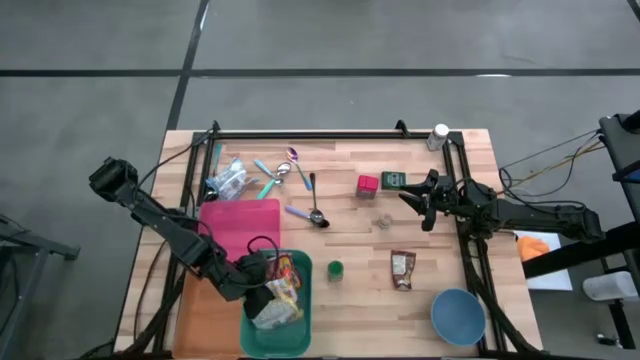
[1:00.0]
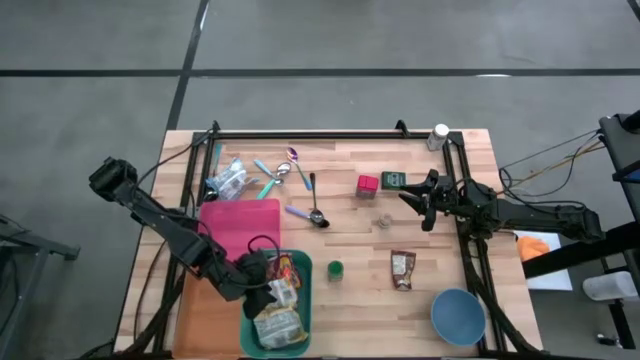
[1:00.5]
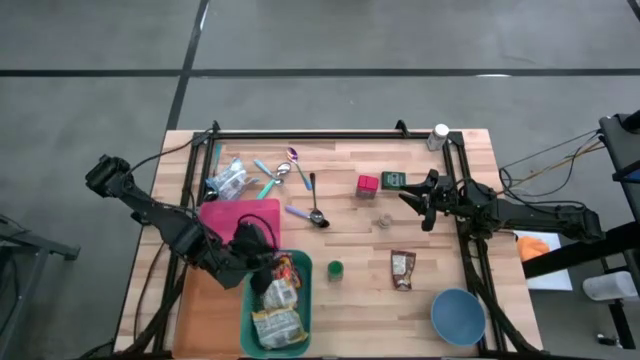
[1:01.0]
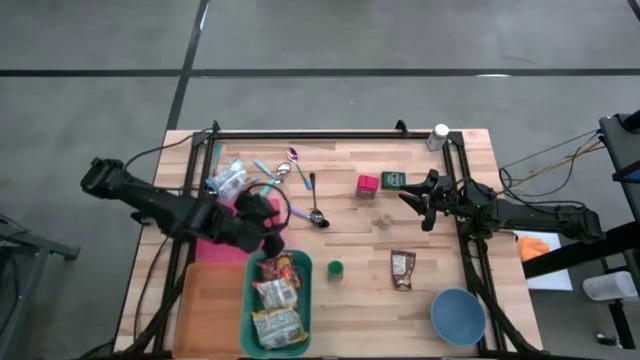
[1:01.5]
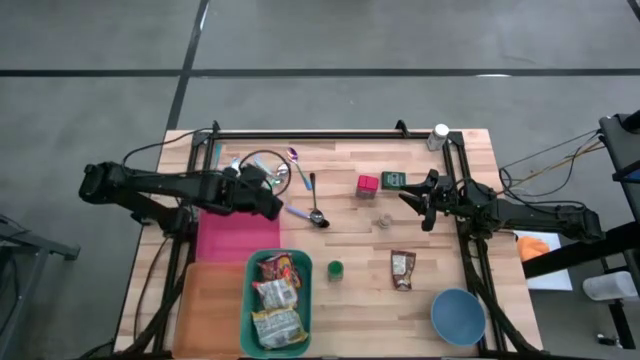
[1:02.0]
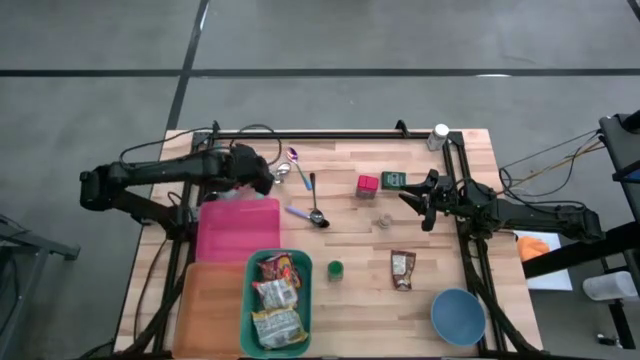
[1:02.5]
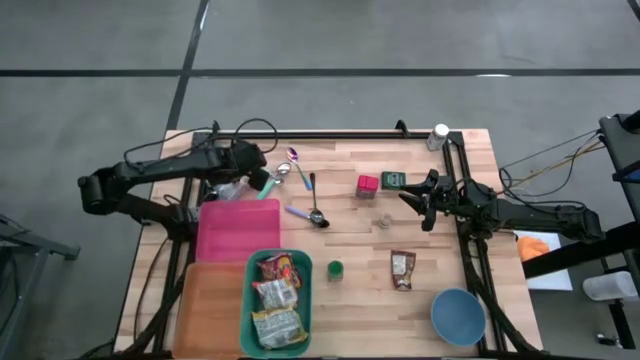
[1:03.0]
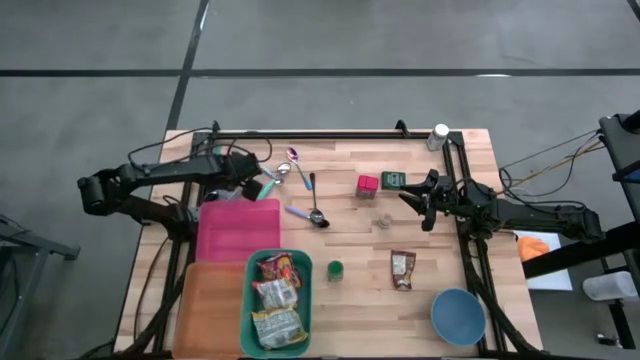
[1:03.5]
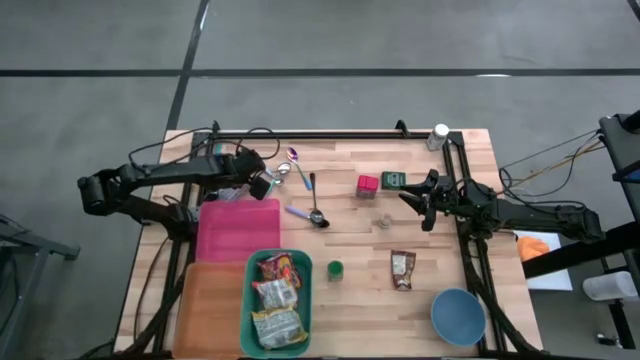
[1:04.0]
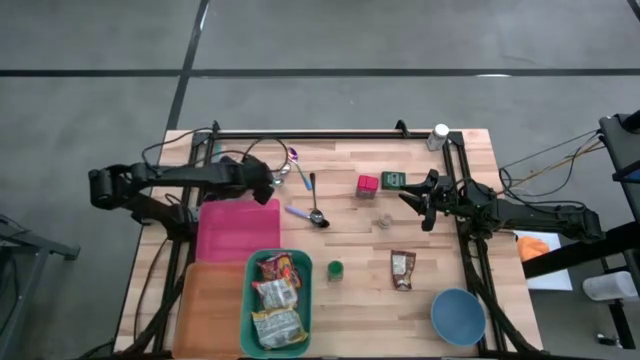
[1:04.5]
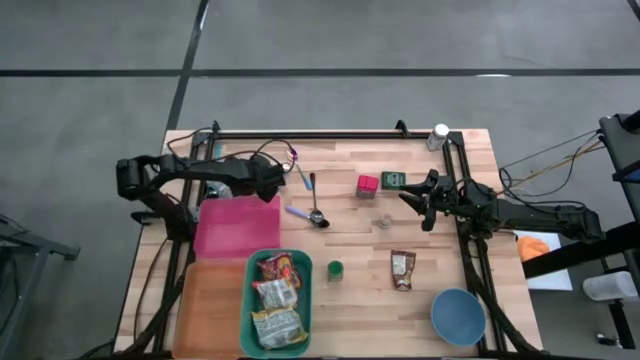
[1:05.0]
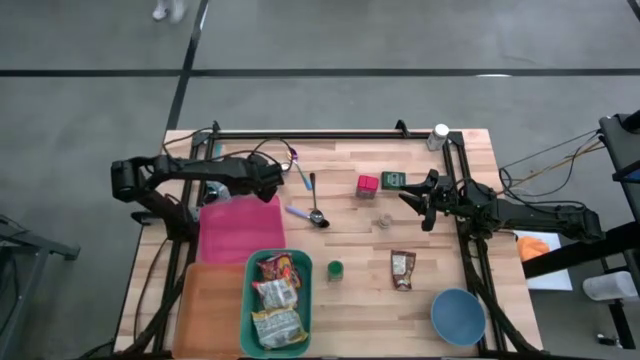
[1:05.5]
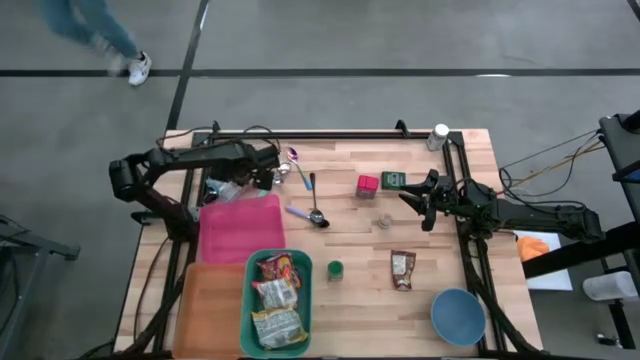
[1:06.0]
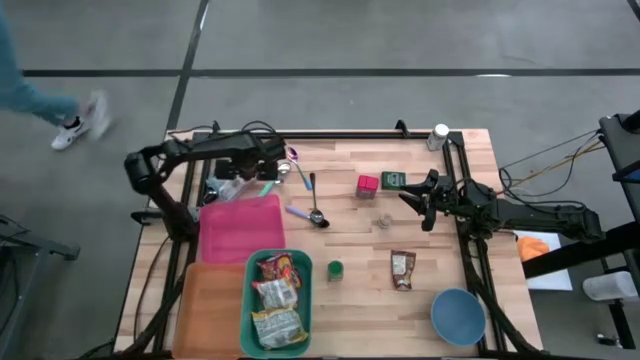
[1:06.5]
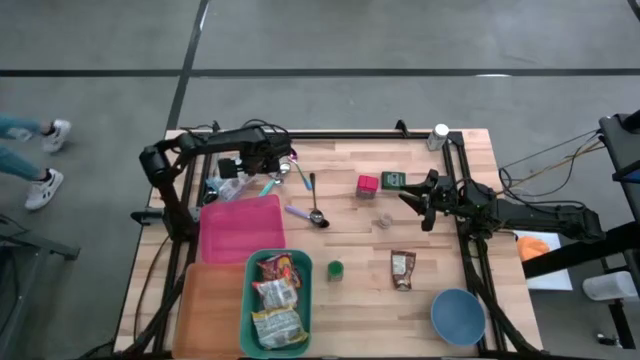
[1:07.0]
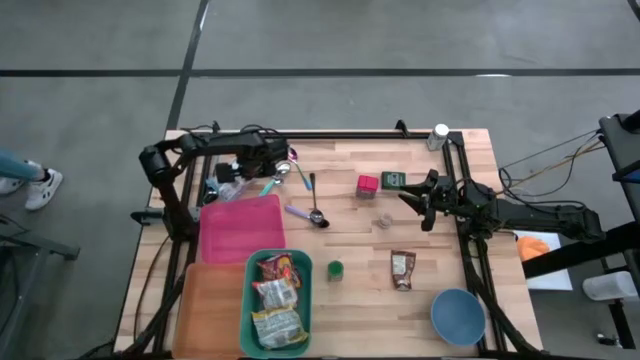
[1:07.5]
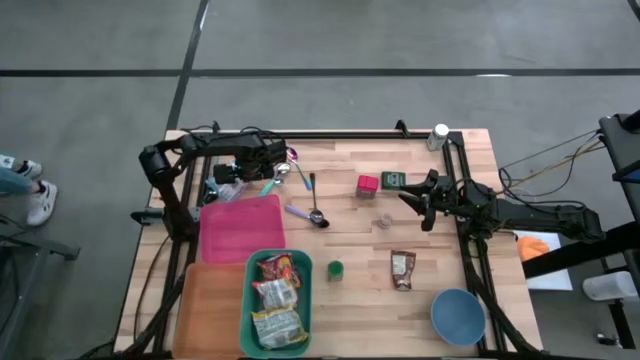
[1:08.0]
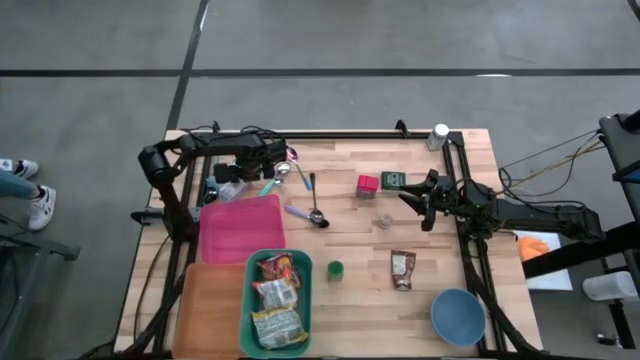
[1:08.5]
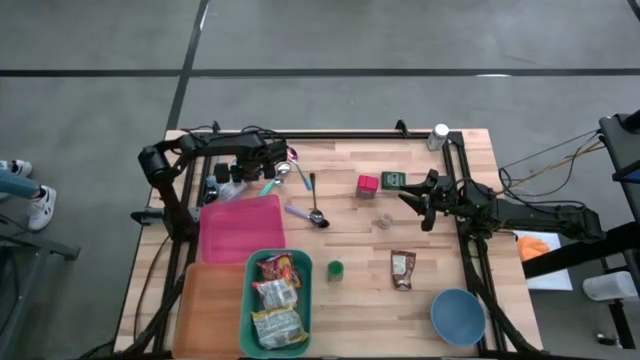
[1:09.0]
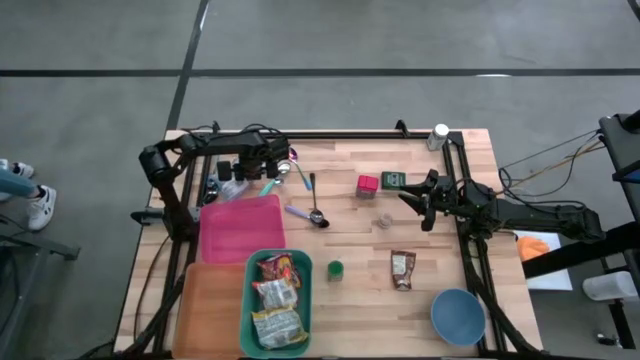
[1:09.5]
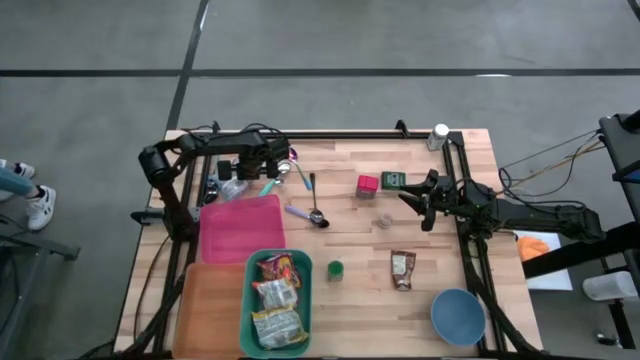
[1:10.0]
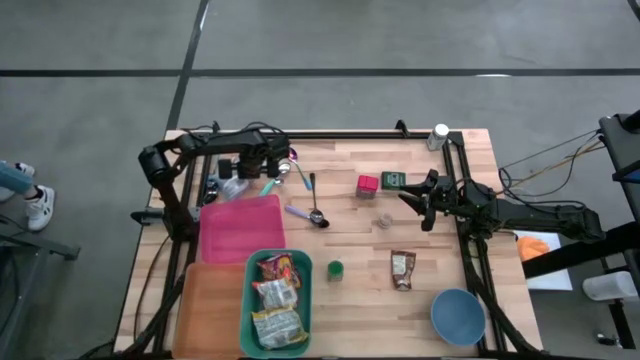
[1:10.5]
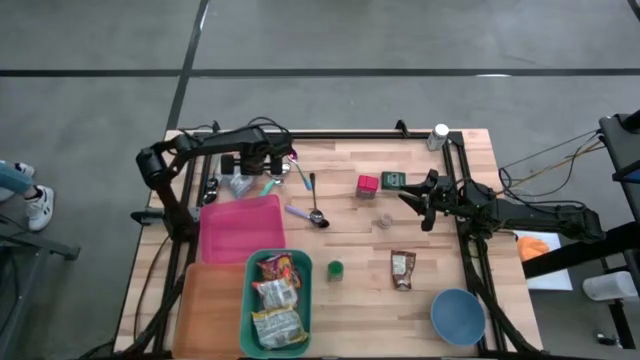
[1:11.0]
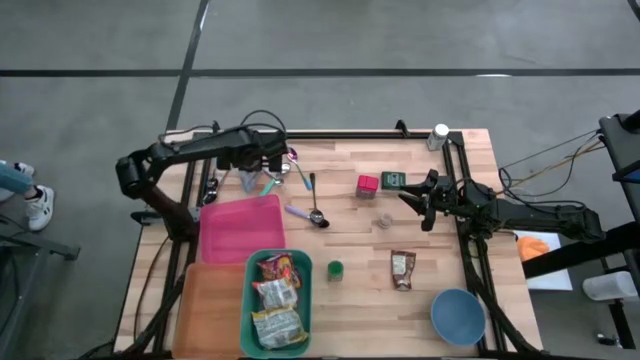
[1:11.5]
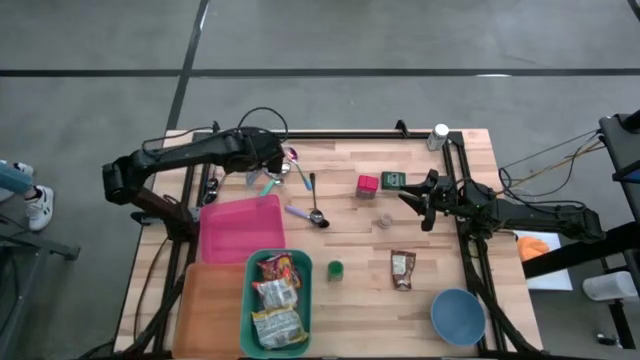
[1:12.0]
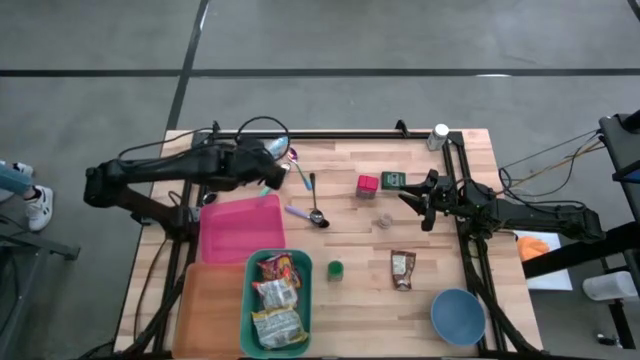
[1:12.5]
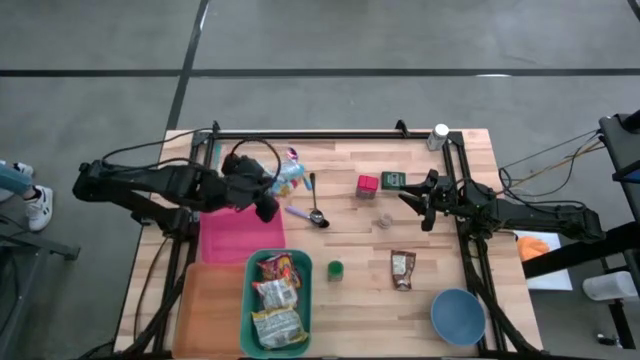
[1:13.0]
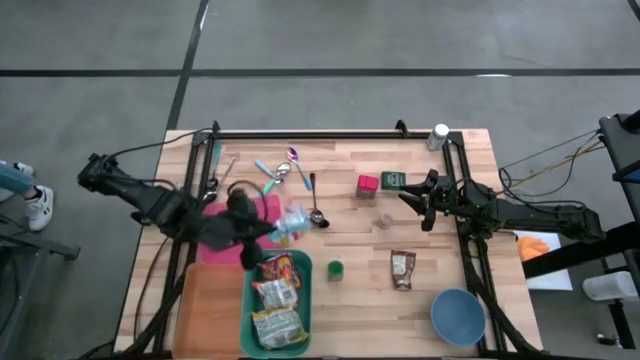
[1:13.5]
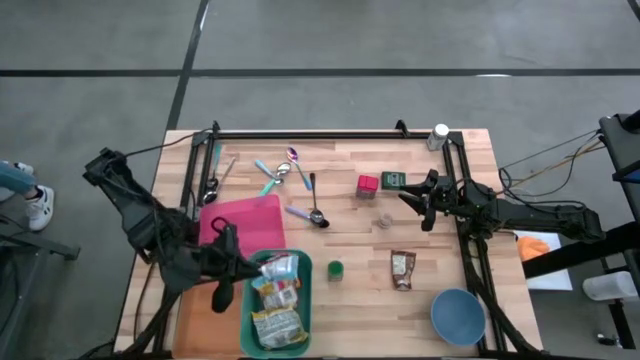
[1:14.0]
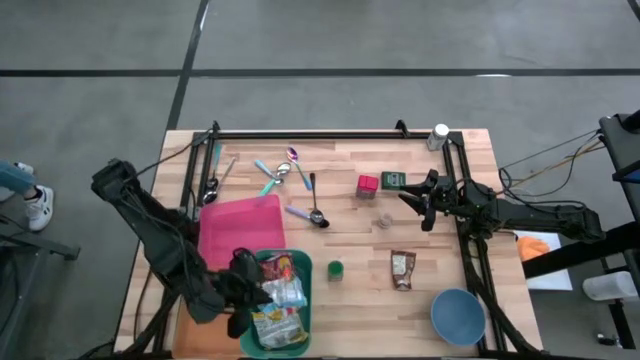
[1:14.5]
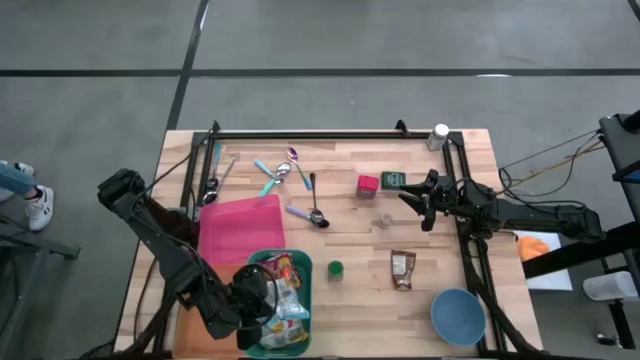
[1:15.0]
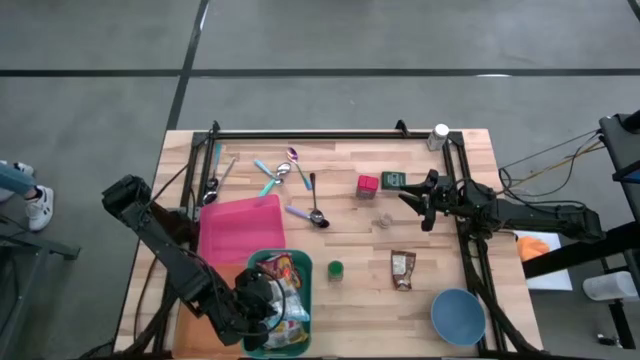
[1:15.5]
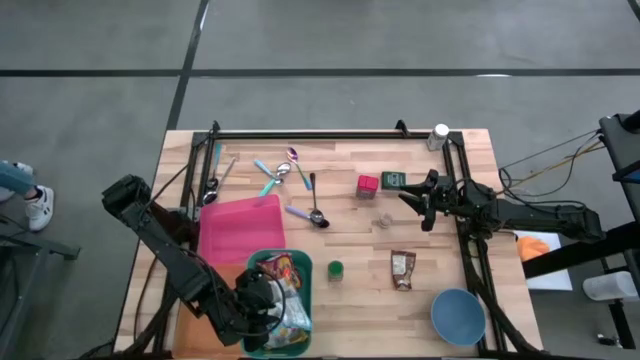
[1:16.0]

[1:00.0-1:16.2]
Put the light blue noodle pack into the green bin
